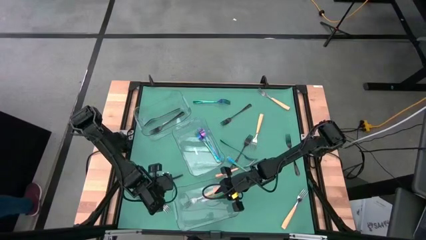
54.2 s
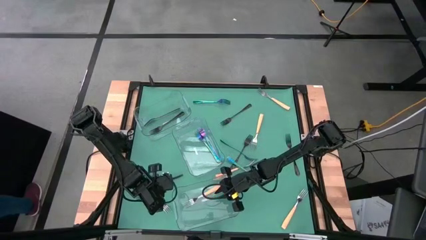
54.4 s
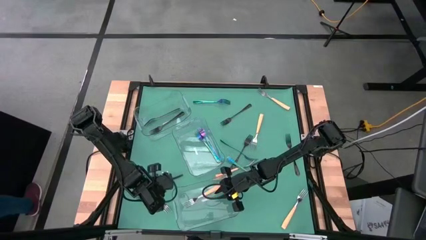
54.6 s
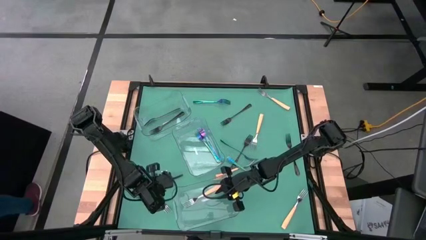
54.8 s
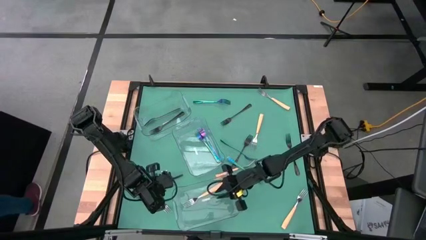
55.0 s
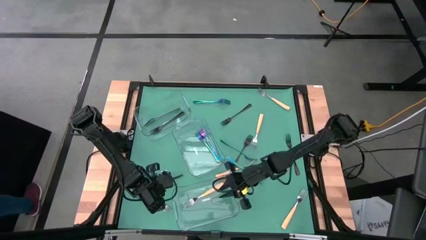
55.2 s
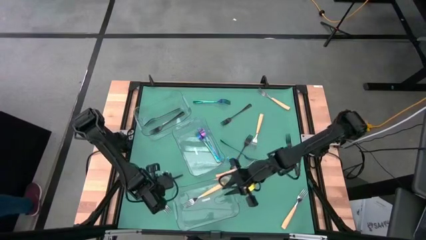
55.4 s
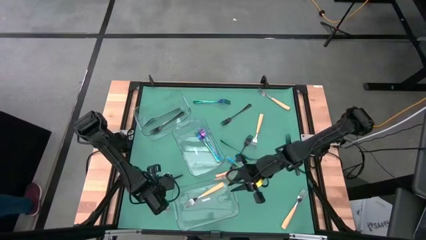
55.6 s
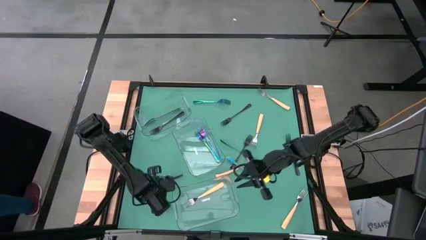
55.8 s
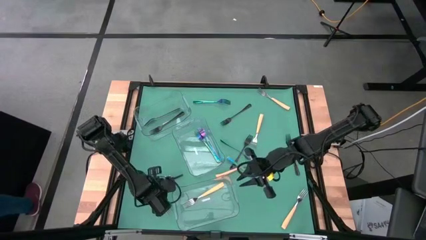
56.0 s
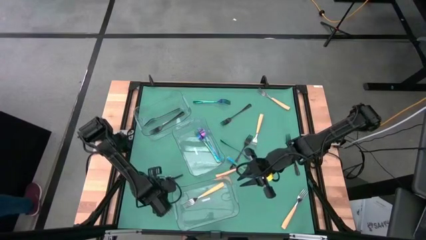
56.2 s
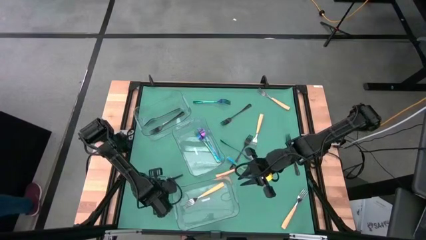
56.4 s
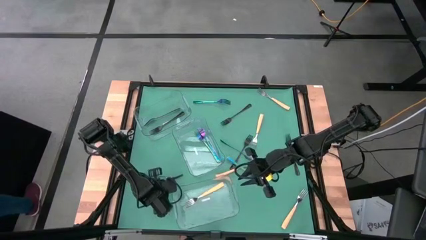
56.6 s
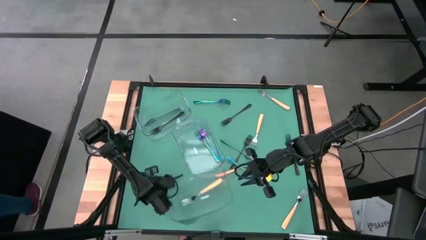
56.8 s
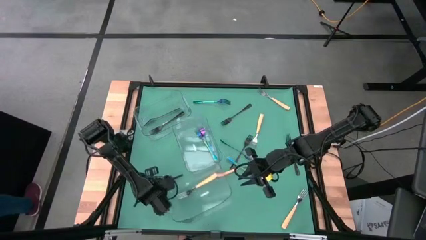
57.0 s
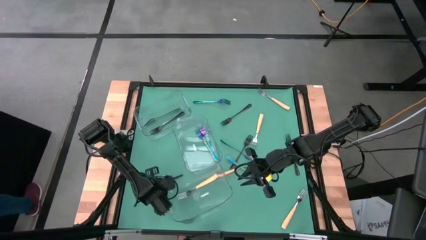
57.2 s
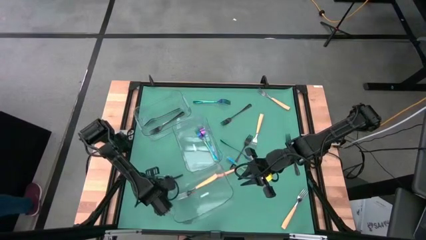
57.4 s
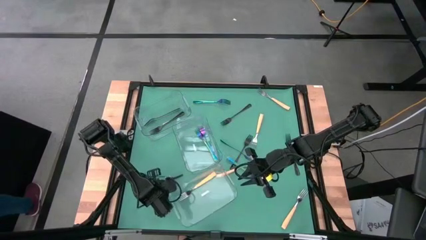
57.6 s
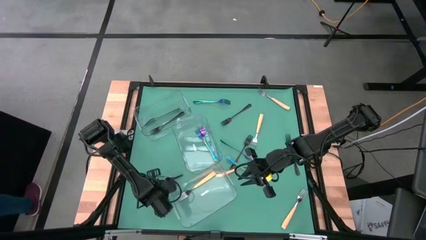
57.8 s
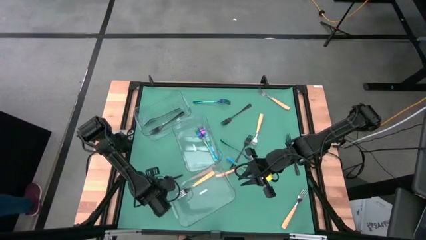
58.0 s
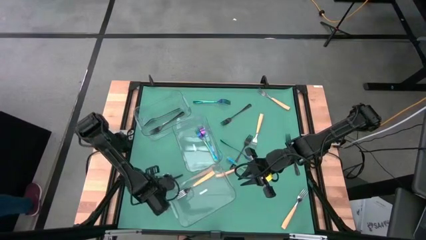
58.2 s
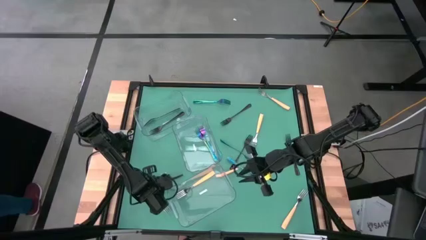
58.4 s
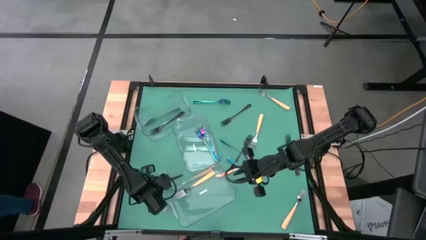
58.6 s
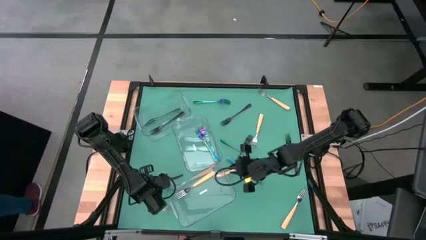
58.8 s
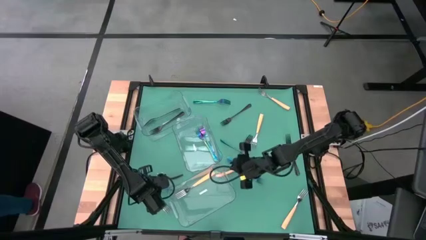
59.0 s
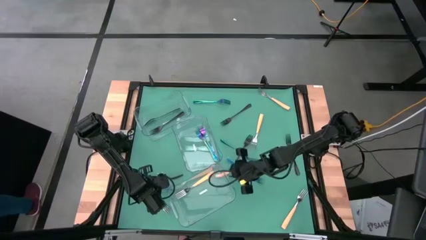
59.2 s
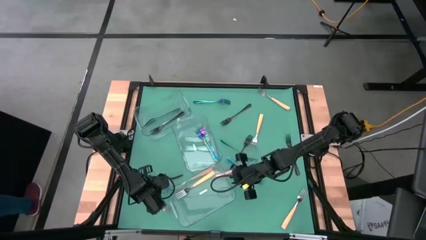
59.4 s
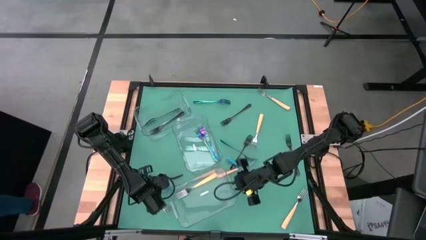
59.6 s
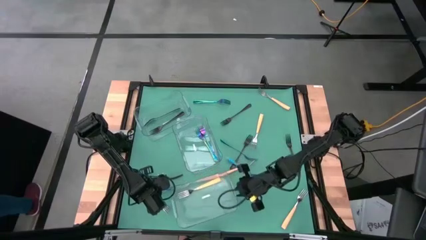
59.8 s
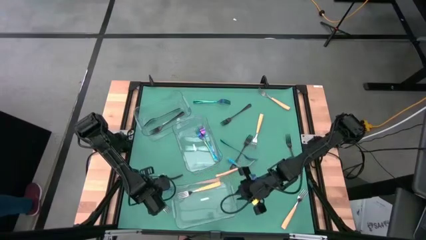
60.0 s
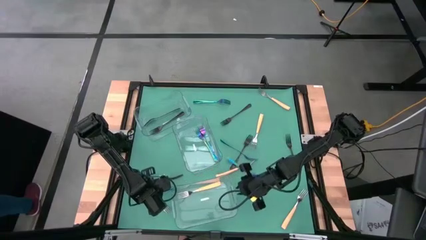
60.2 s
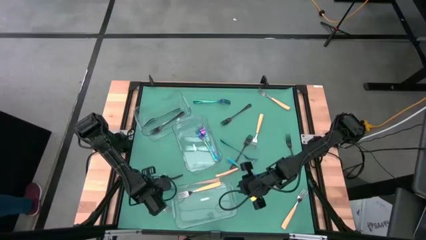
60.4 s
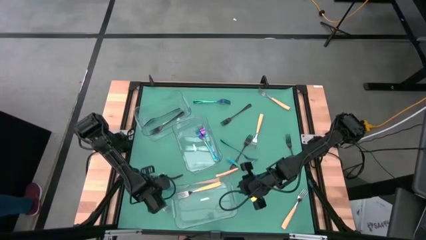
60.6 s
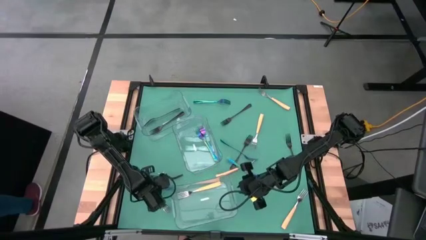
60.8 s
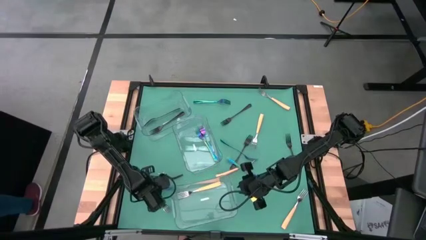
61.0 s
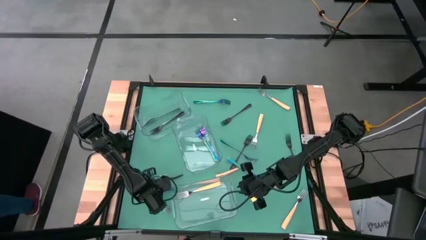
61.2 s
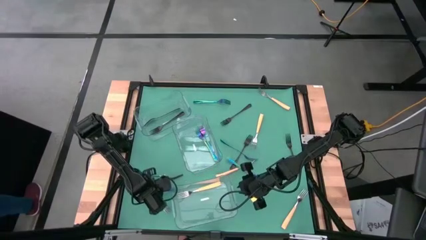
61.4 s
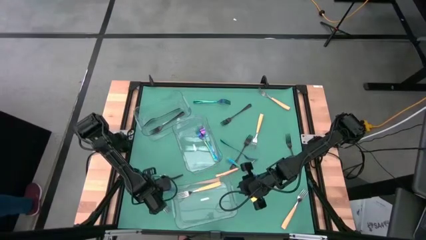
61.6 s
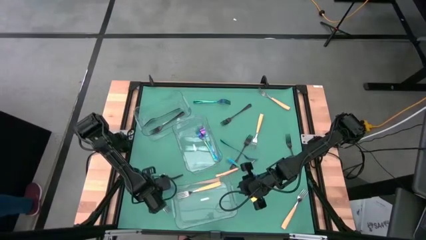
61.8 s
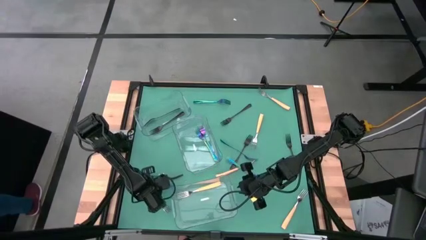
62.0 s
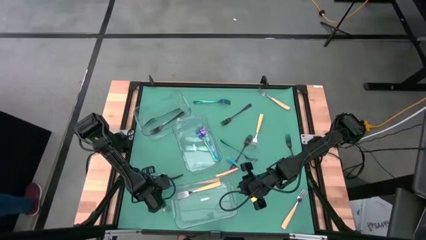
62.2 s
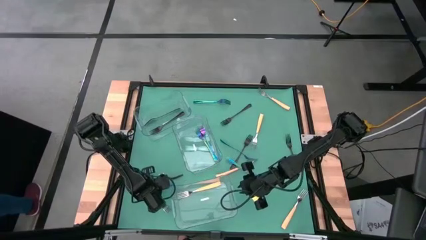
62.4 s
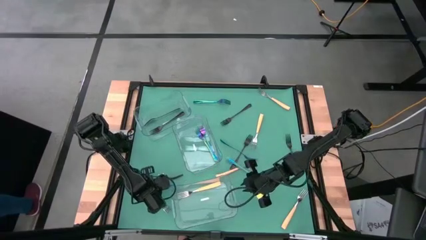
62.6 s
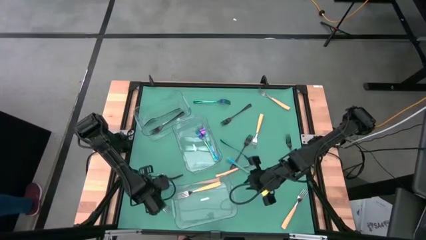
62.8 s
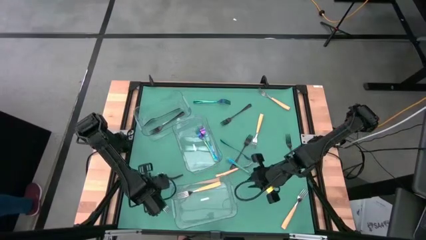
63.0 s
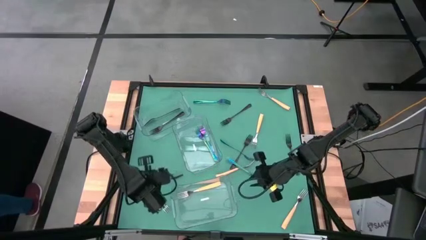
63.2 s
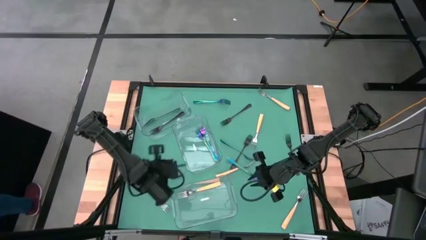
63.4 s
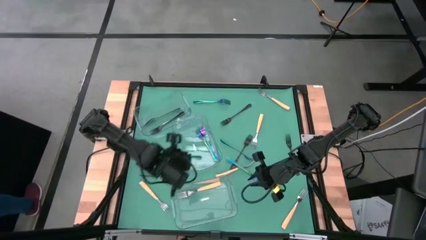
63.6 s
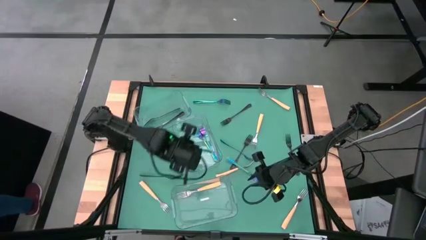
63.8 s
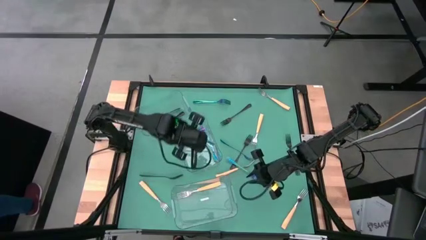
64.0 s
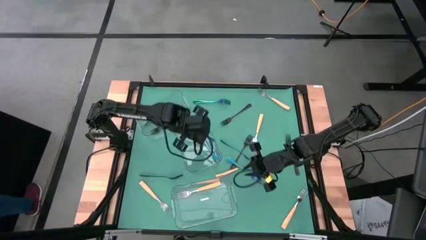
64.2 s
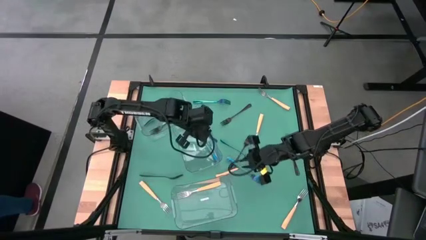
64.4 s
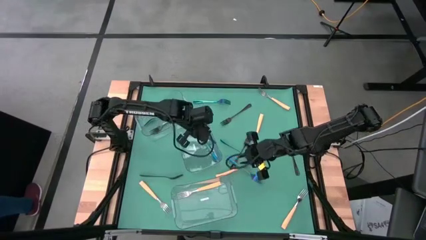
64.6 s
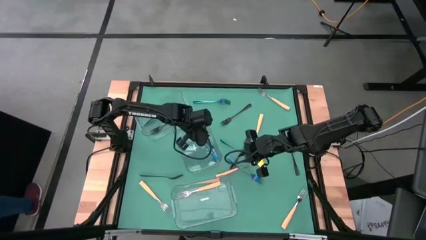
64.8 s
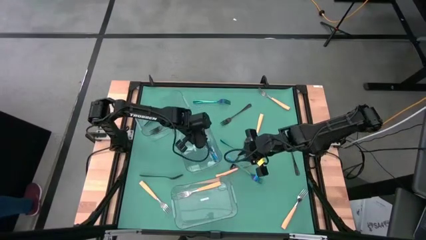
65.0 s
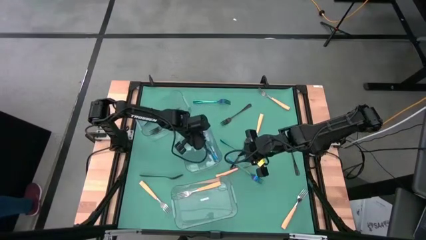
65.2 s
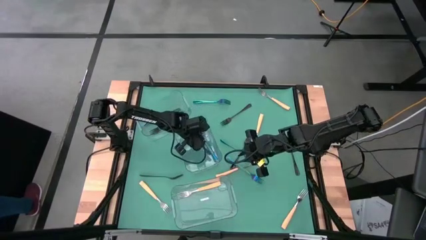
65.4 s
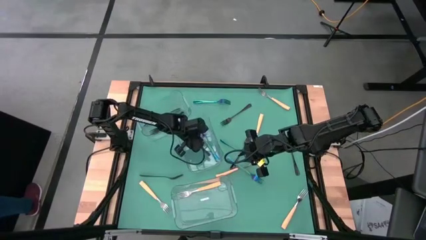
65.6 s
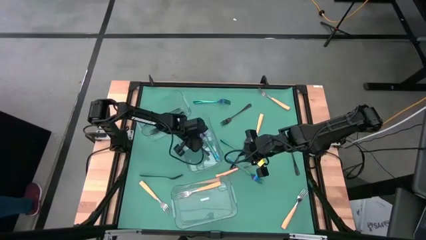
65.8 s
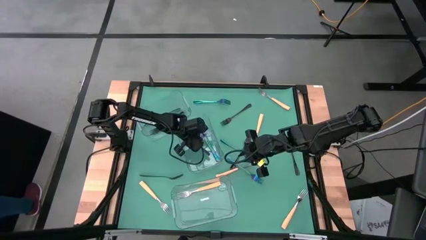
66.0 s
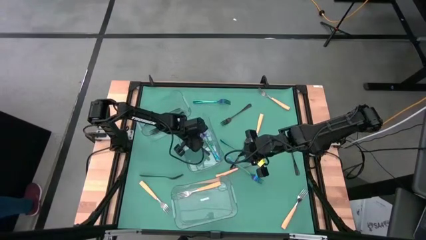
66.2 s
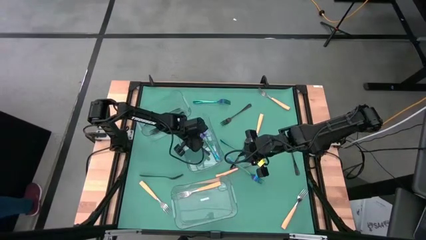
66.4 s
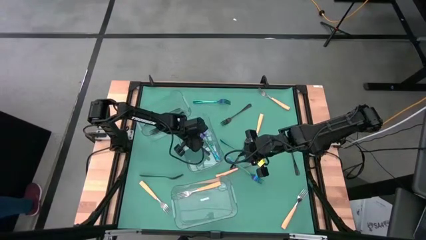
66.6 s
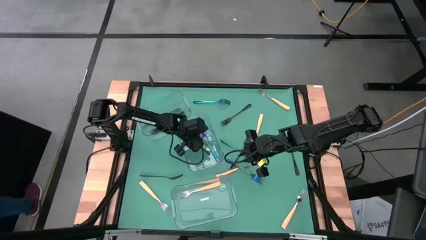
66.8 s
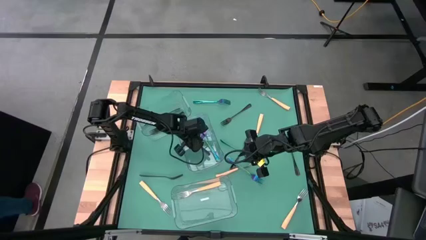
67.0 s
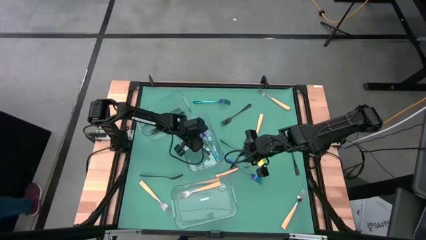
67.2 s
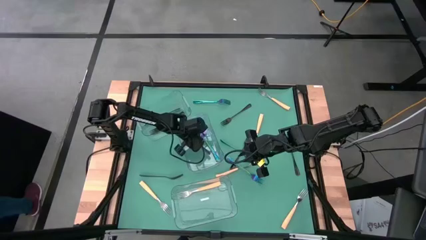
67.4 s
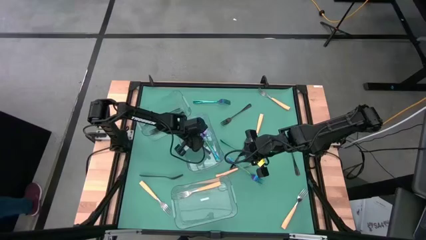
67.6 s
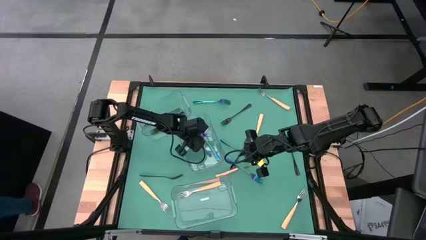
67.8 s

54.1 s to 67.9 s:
Task: Sort silverware by color (type)
Put the blue fork into the center transparent bin

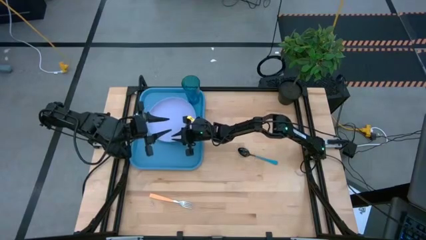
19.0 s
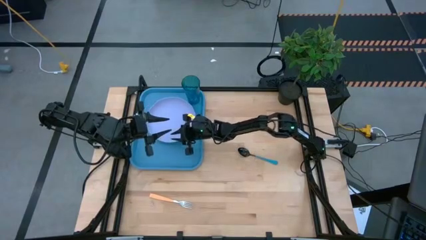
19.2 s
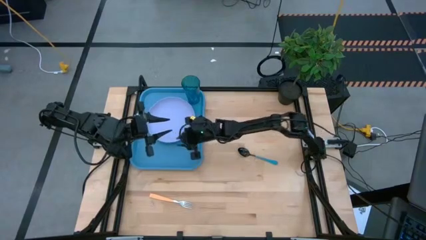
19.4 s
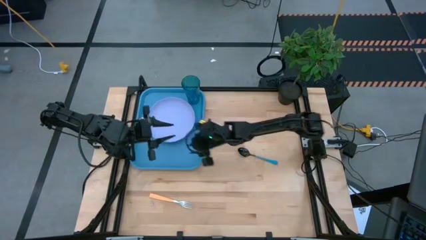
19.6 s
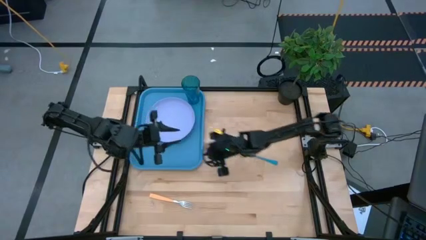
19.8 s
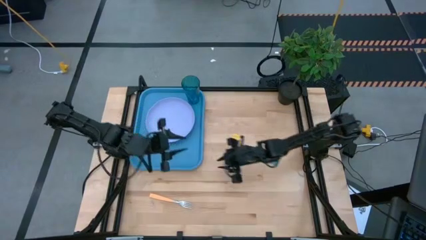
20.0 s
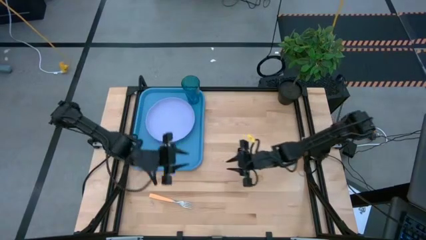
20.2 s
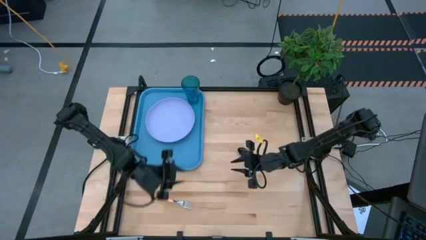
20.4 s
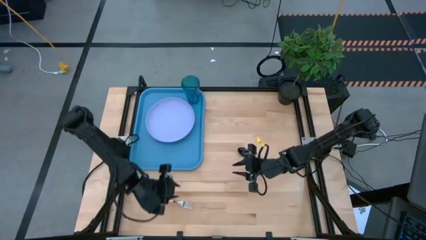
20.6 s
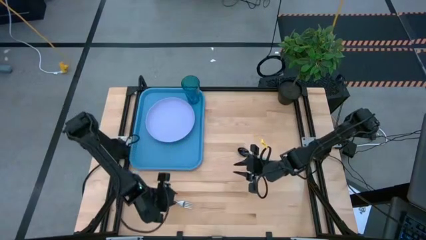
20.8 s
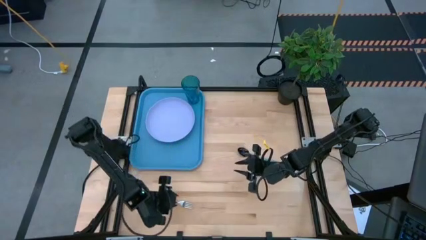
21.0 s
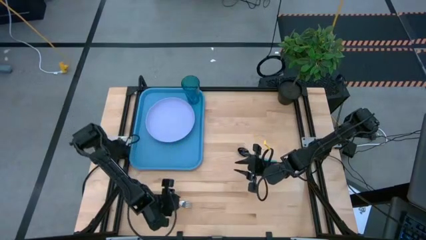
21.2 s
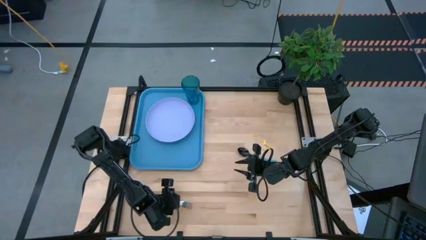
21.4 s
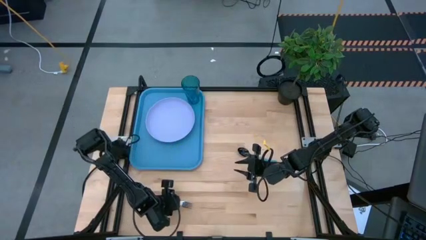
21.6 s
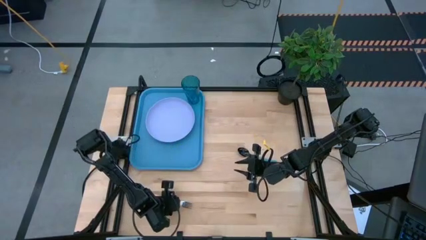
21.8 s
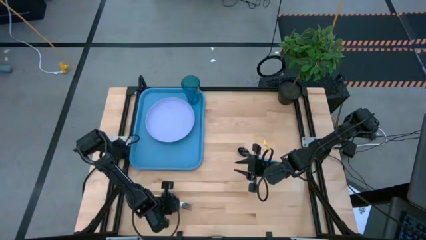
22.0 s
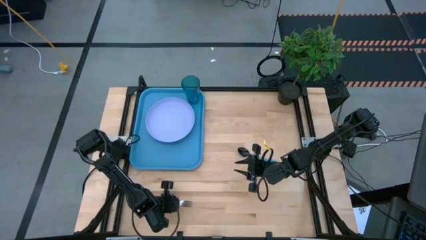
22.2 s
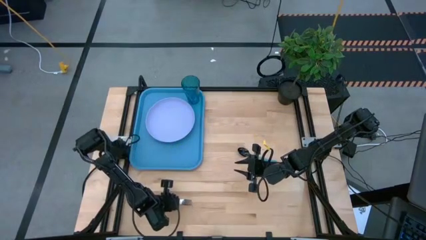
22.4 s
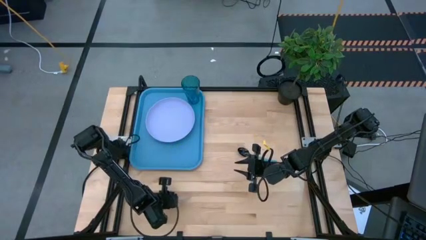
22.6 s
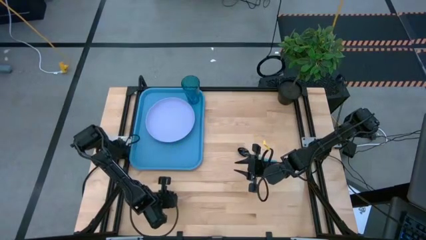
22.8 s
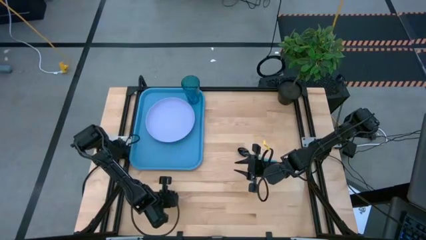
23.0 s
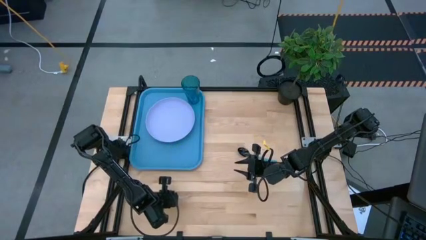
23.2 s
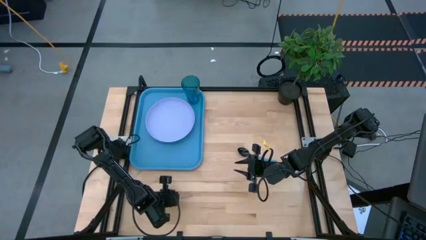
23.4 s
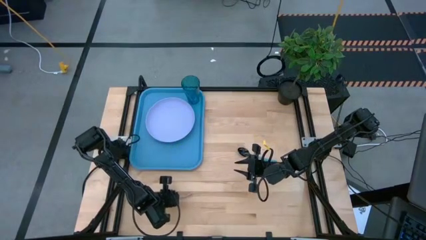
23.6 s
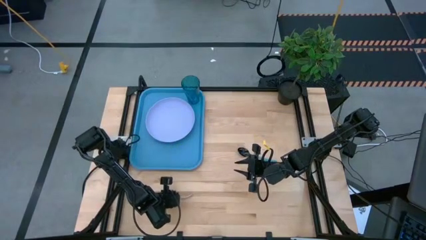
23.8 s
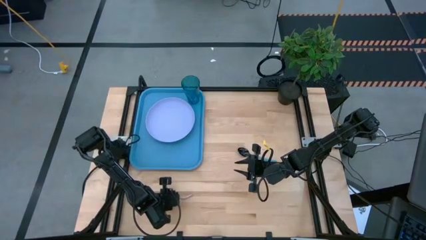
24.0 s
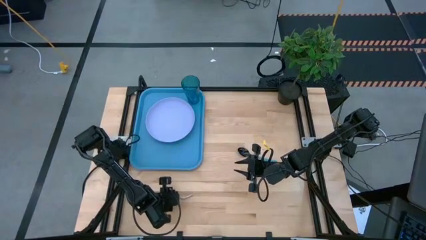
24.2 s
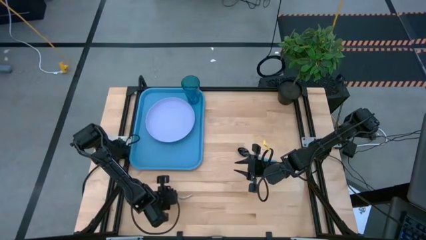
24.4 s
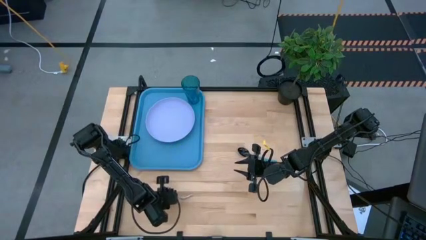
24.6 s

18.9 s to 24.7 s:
Task: Pick and place plate/cup/fork/spoon on tray
Put the yellow fork on the blue tray
